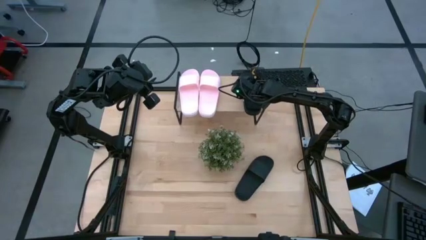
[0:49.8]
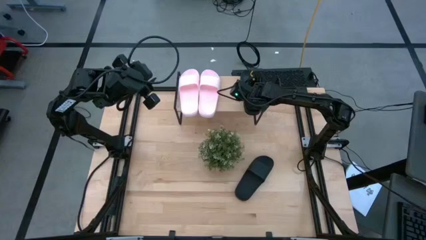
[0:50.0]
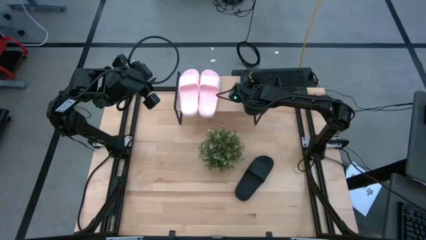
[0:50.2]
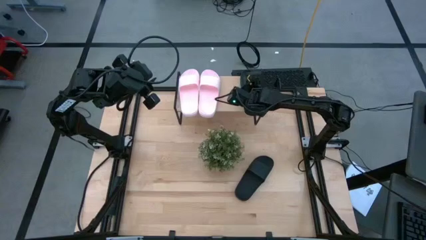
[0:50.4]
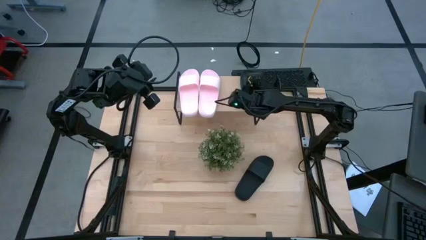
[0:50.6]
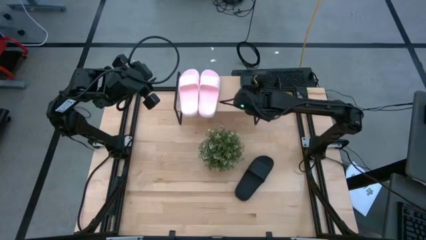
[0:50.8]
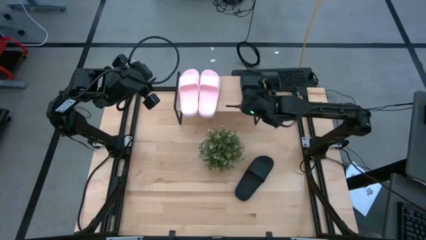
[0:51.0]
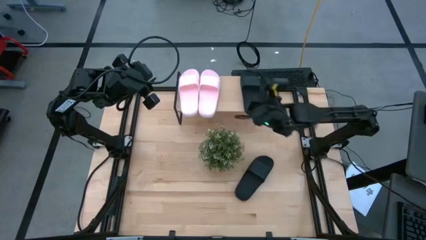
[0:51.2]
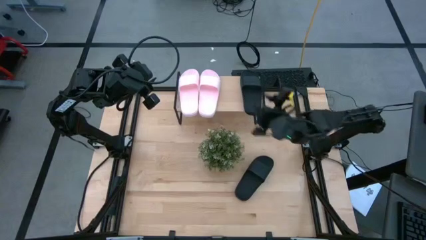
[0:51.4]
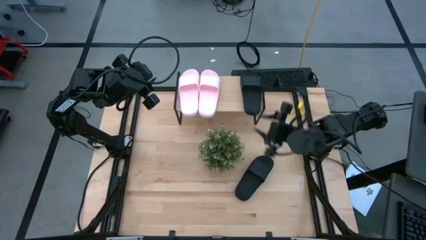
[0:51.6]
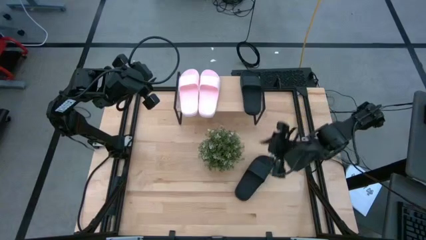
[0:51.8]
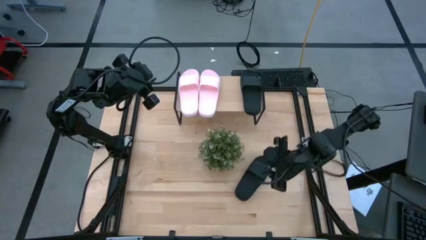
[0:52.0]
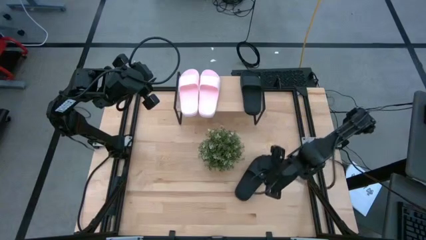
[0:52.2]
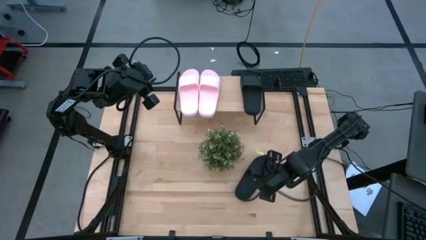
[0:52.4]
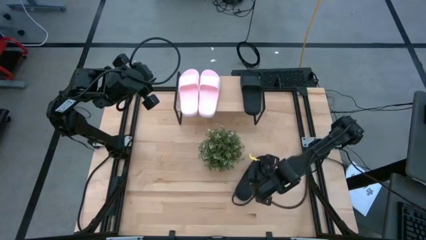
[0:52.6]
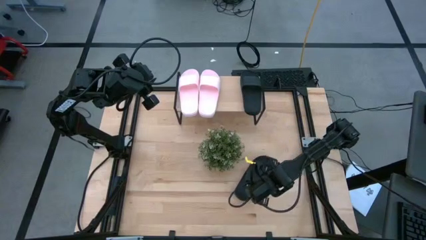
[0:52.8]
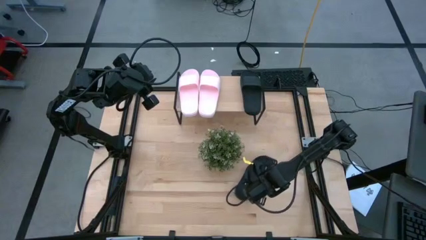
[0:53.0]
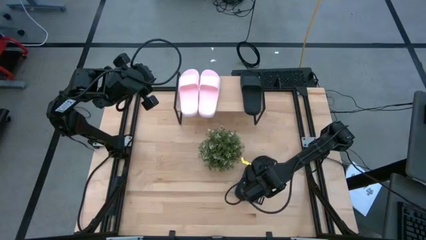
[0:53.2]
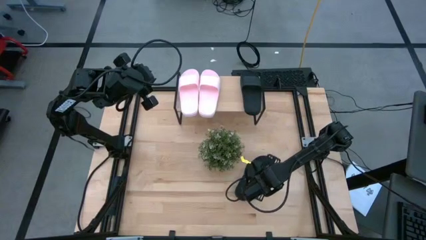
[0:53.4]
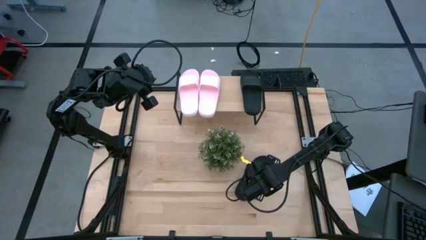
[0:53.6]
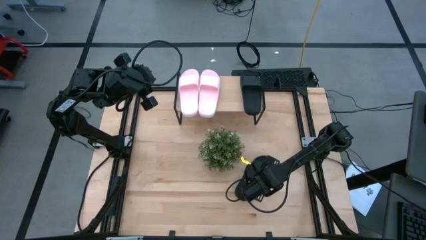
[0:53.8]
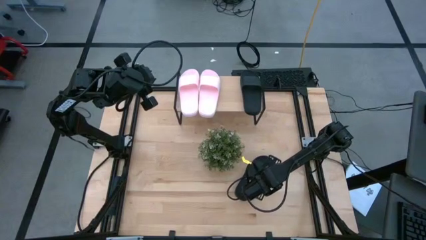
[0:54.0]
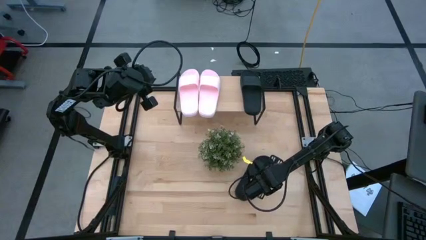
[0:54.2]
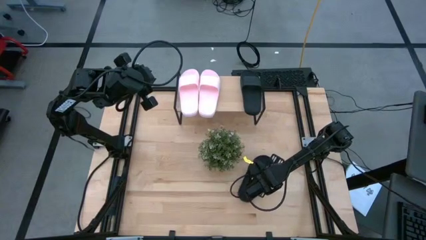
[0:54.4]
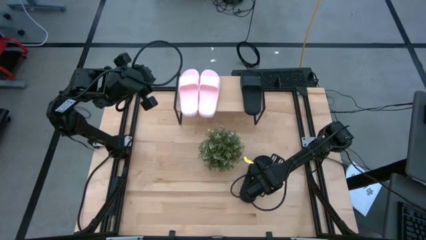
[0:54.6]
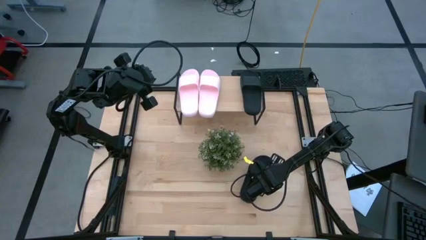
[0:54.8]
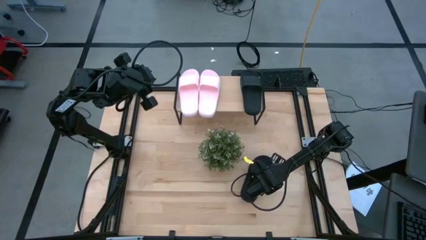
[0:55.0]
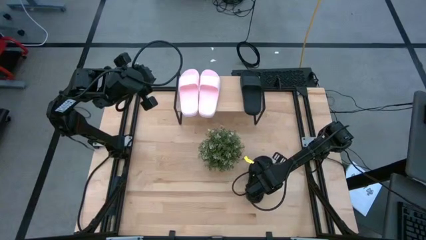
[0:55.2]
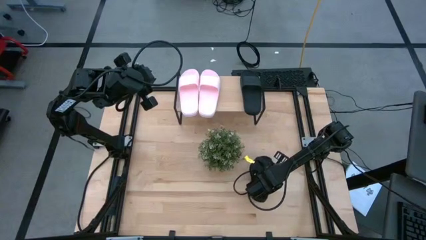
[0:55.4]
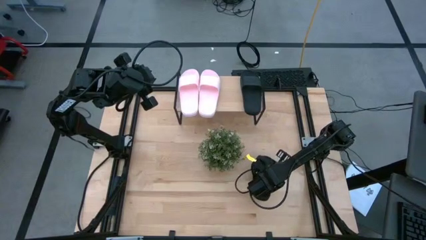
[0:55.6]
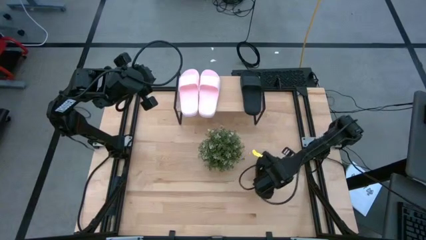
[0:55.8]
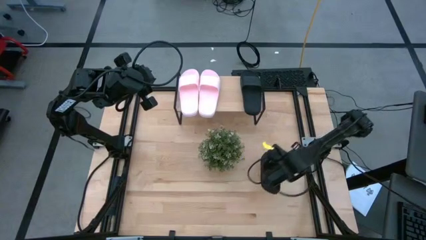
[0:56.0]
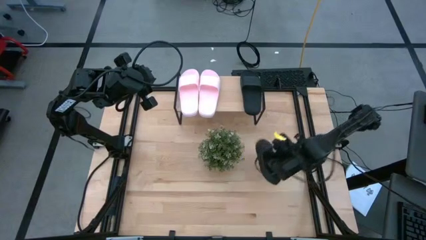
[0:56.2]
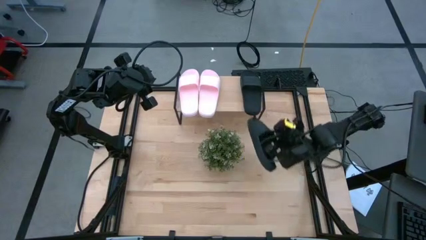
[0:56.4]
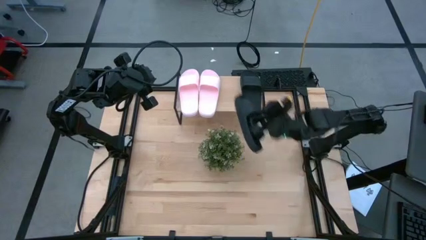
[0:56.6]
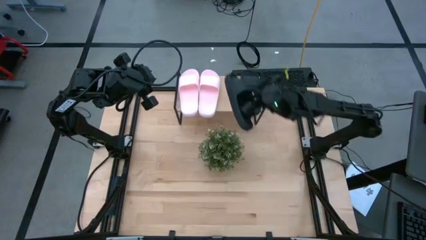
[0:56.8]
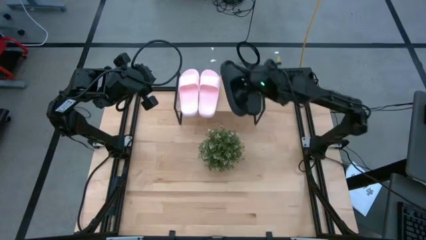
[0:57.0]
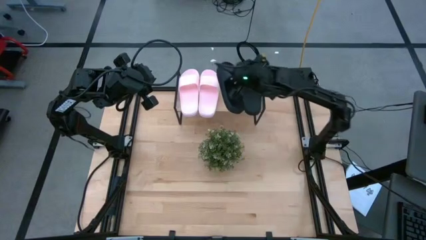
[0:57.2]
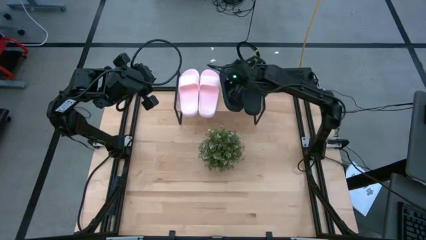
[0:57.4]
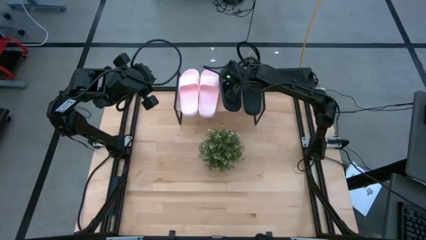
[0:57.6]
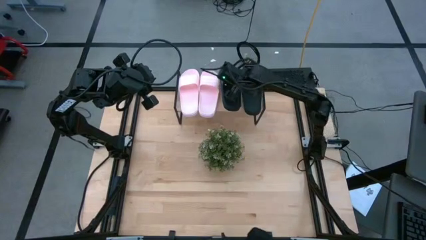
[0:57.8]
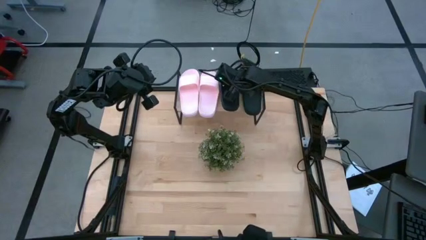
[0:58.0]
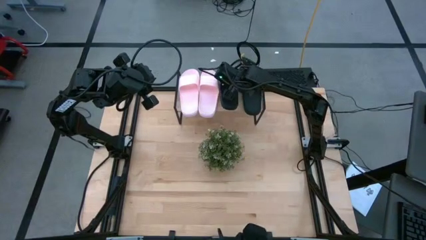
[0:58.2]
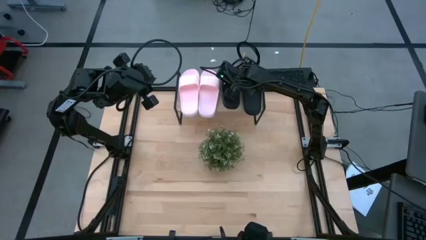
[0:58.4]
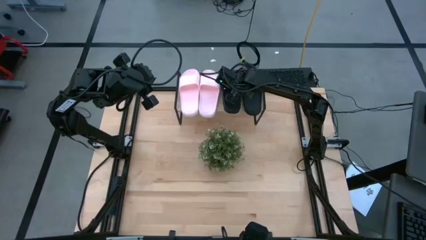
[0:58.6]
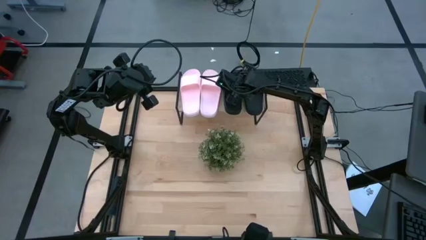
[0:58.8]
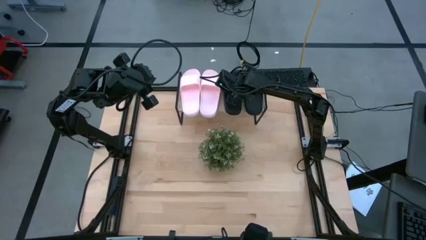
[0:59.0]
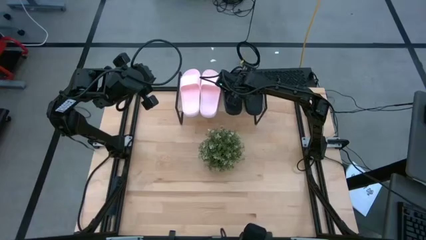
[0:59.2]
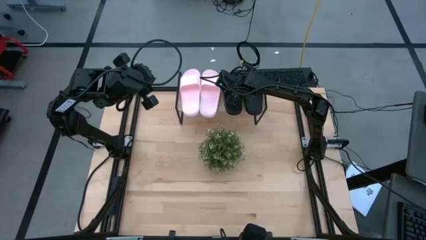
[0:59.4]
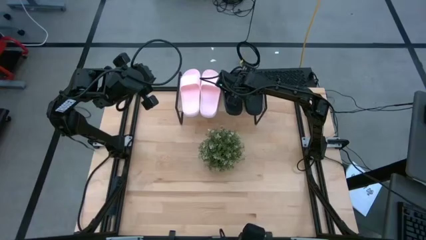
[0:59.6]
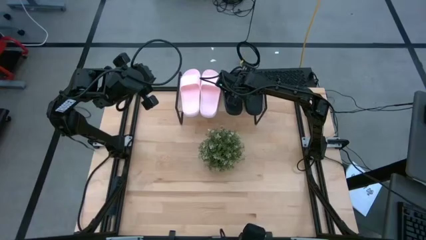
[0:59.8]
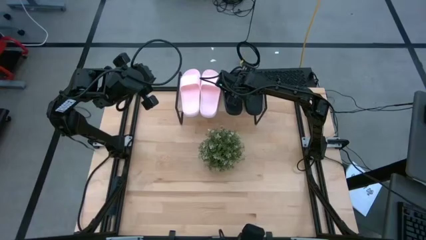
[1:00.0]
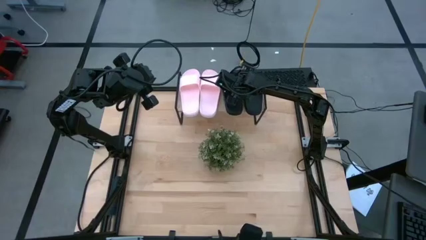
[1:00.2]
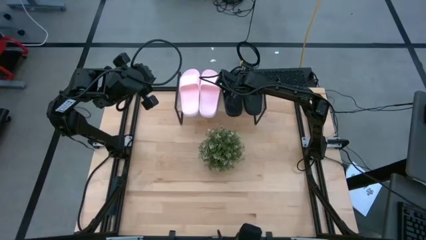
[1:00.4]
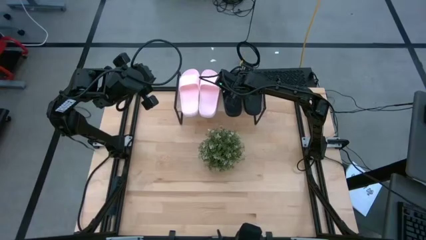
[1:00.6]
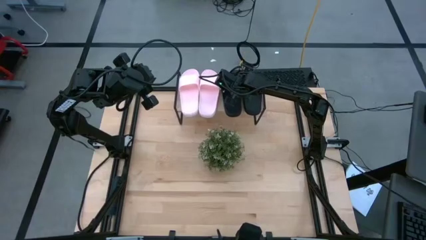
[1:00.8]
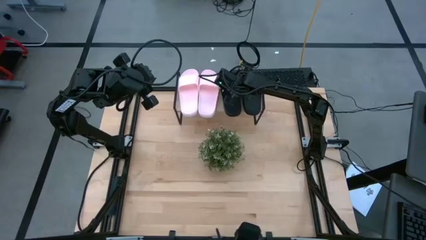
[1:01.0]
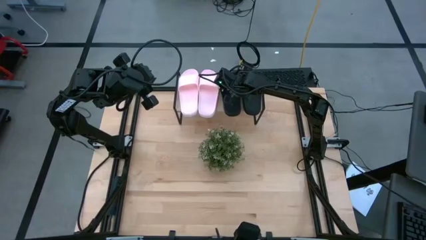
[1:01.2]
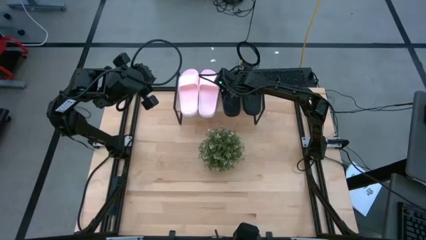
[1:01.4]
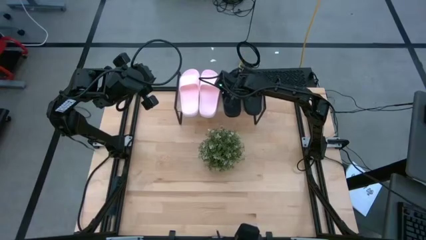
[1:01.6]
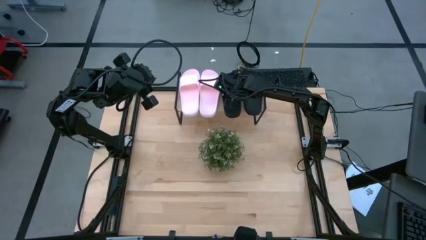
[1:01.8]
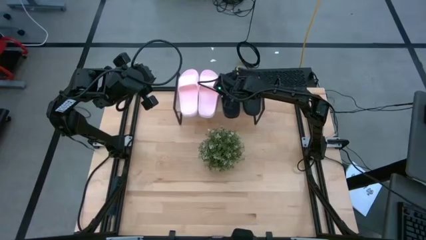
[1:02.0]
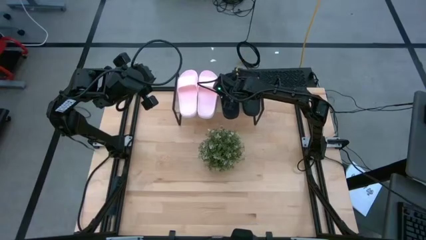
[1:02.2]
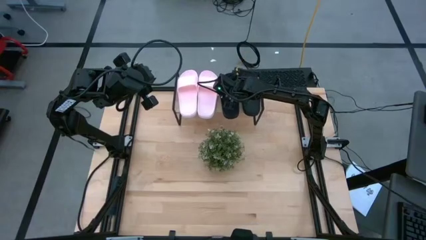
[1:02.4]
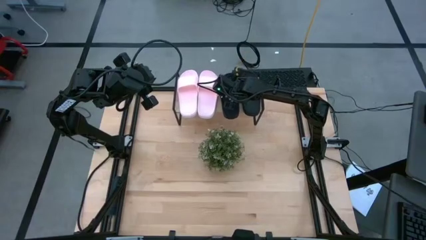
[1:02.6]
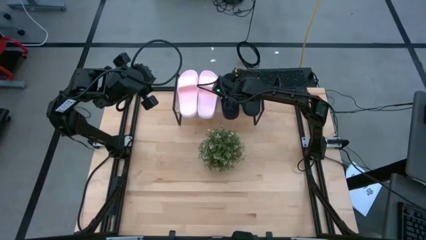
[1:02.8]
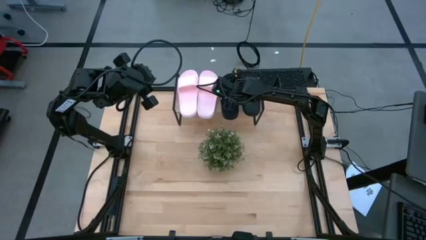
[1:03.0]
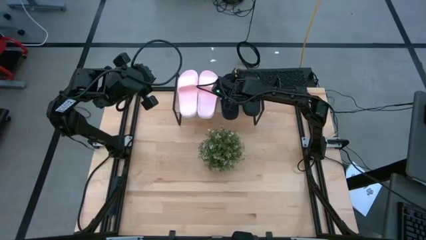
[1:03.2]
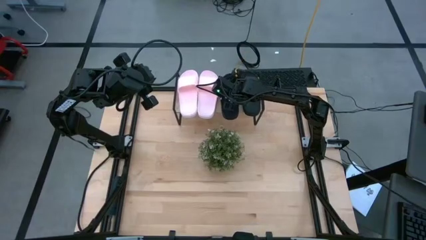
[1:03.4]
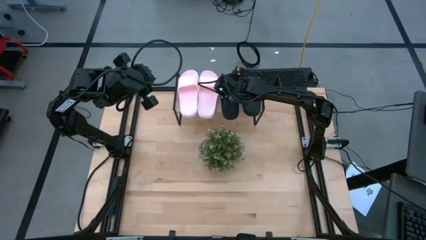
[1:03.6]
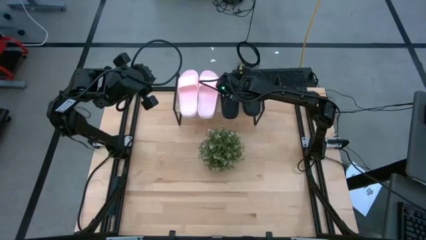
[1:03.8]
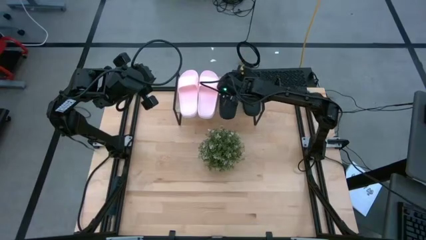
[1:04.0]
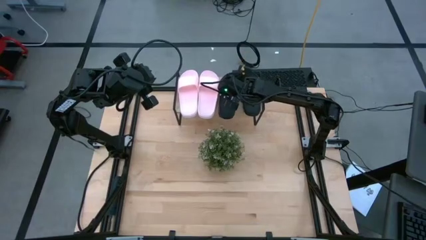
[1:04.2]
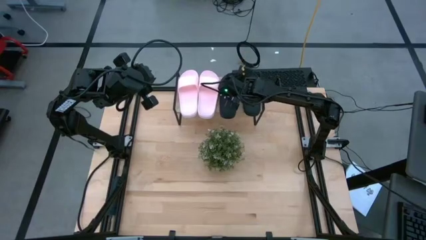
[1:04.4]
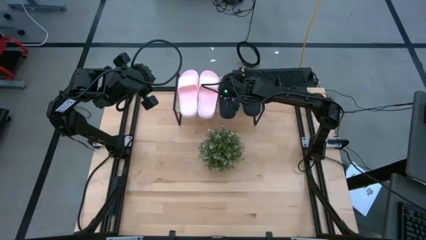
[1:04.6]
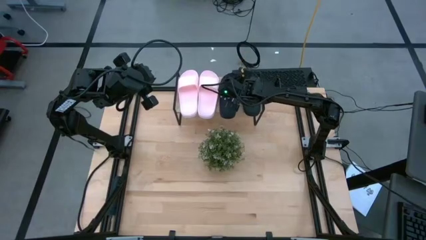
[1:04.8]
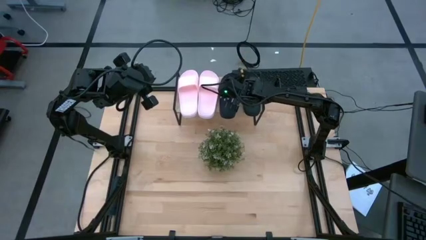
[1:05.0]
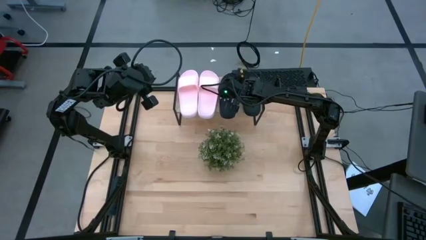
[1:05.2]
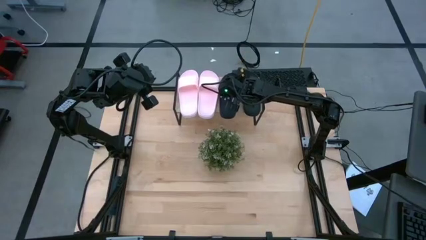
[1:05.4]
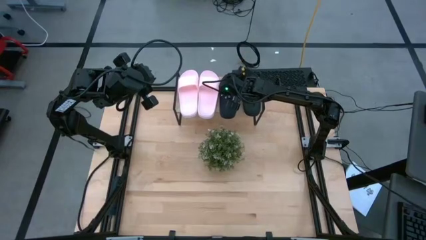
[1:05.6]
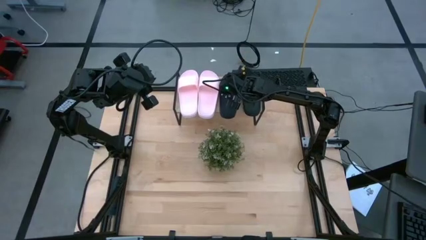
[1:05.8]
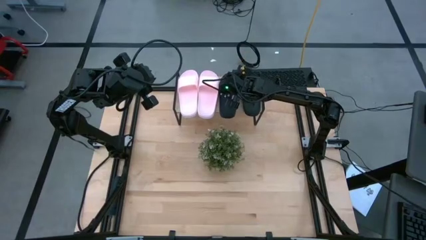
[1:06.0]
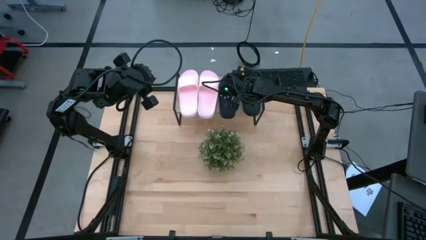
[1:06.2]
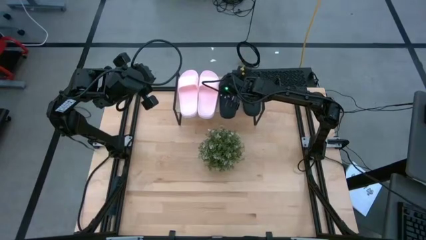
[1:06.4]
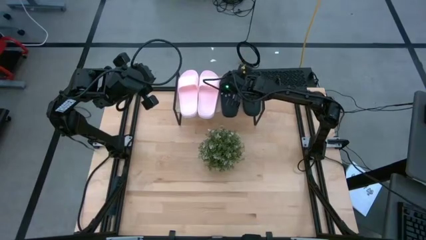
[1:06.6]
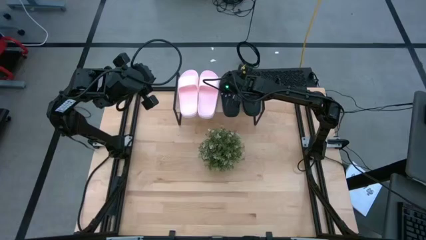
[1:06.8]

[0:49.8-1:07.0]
Task: Pick and place slides into the shelf
Put the black slide on the shelf
